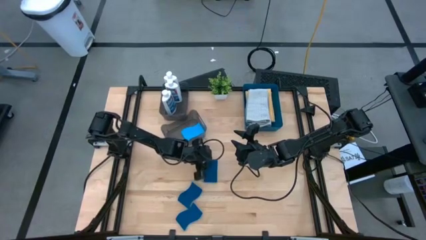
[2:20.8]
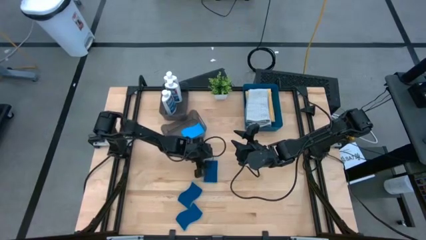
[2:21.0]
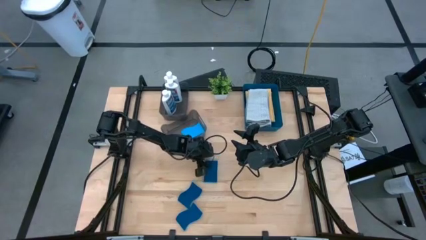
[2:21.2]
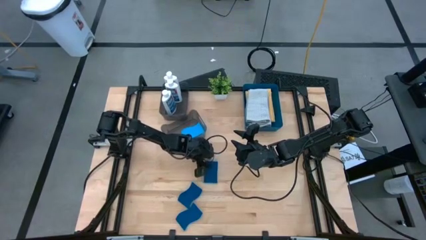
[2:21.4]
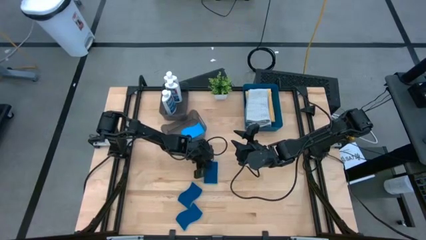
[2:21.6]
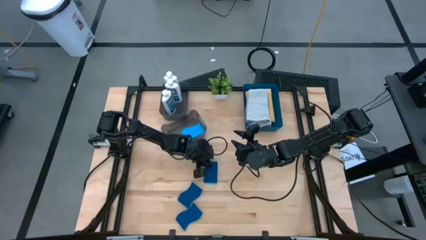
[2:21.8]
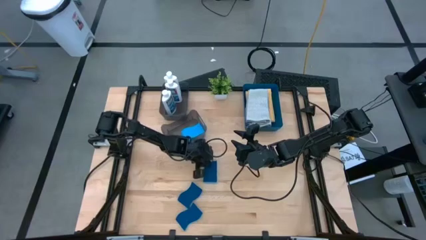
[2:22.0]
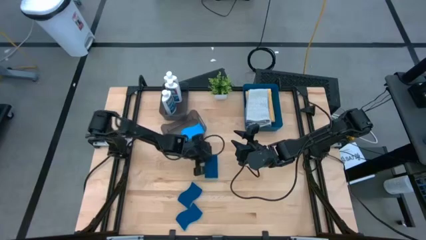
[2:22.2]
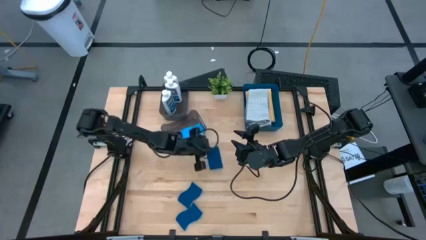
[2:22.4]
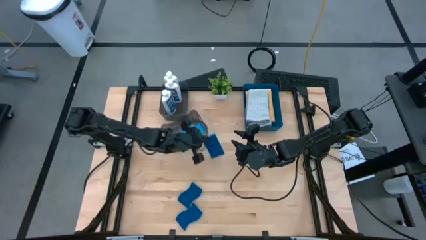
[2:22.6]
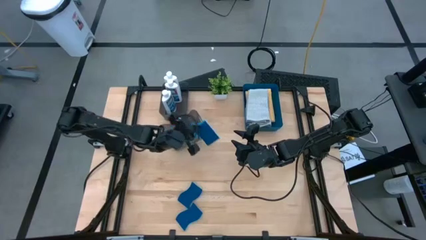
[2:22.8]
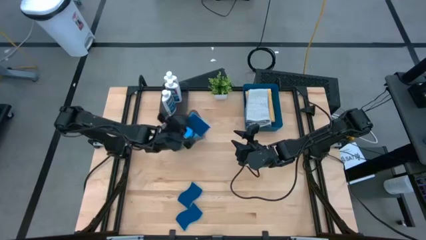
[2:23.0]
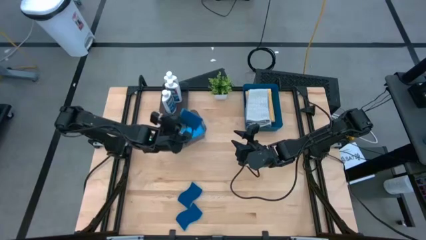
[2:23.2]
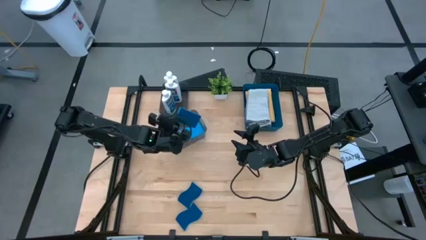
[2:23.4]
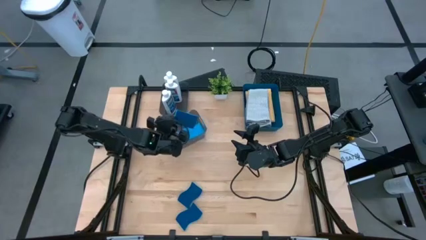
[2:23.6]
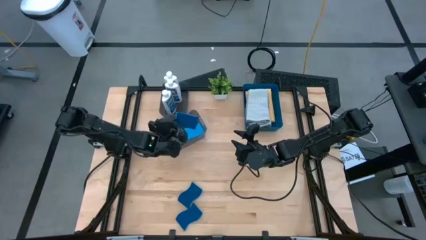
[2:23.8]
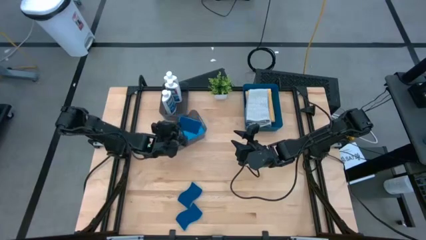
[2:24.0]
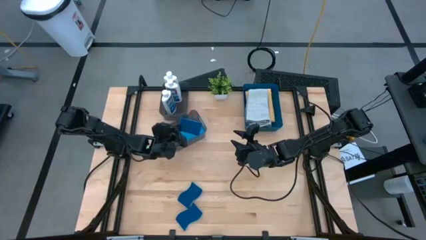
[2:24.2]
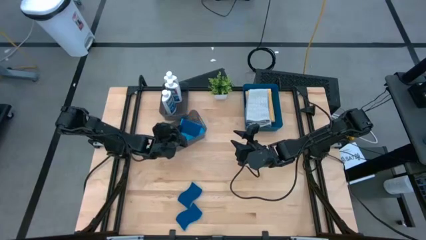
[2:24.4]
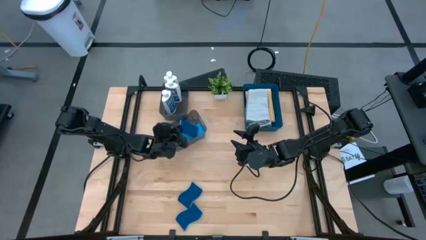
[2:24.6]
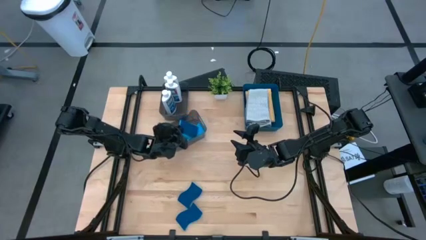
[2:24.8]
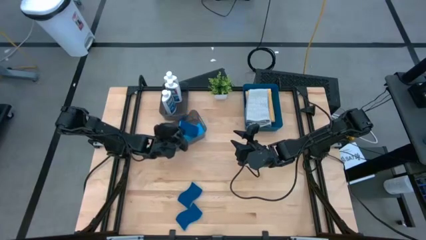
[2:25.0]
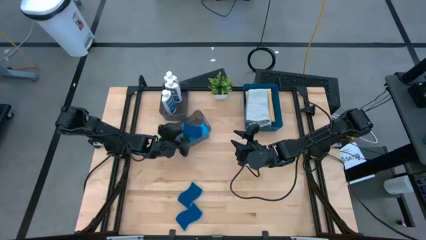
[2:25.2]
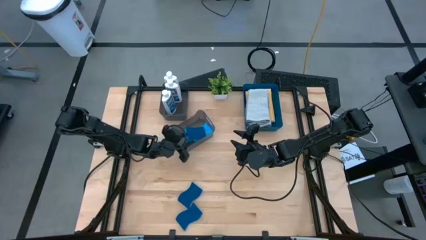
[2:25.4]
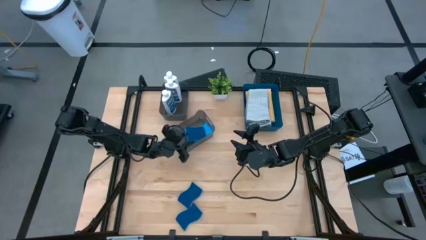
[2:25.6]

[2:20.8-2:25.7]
Task: Pick & Place Kitchen Items
Put the blue sponge into the bottom black bin

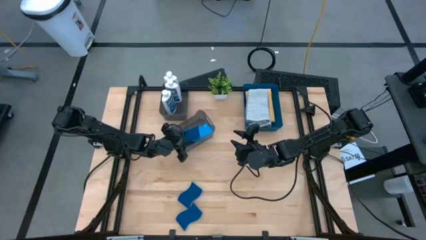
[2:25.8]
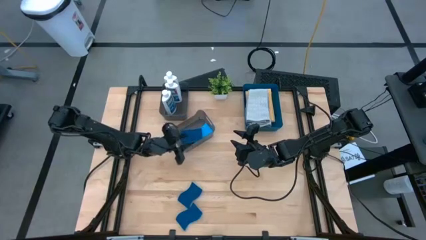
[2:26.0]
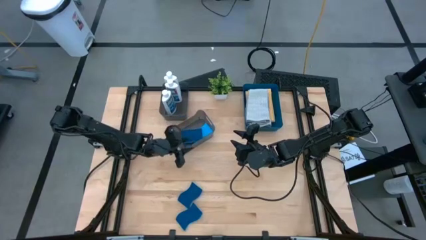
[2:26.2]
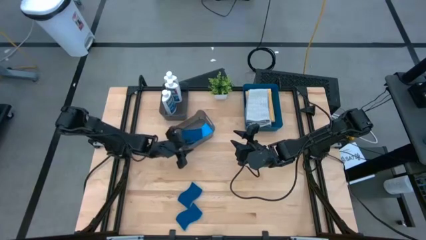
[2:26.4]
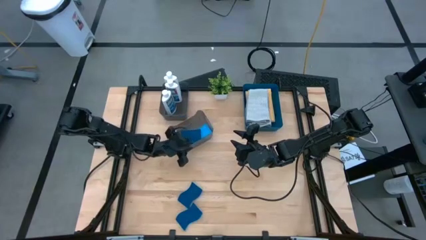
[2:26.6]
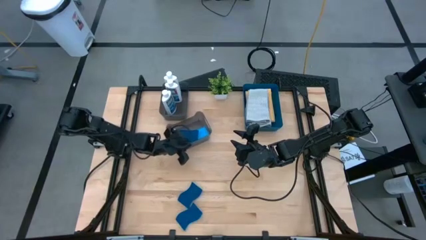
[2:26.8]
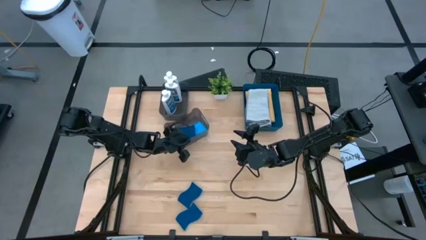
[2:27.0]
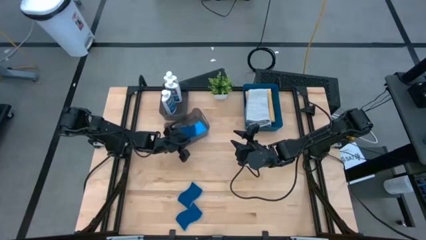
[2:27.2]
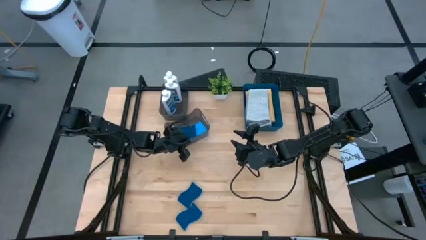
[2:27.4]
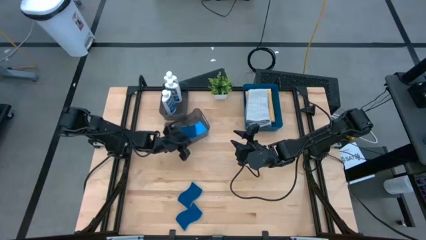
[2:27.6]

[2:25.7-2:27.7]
Adjust the bottom black bin

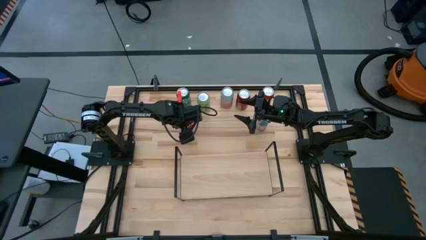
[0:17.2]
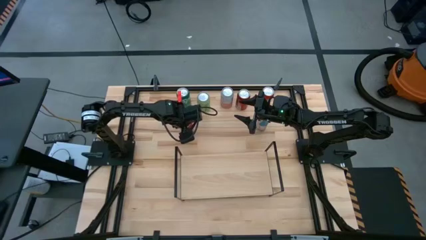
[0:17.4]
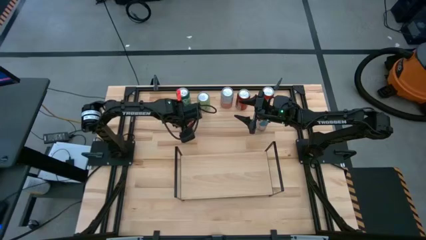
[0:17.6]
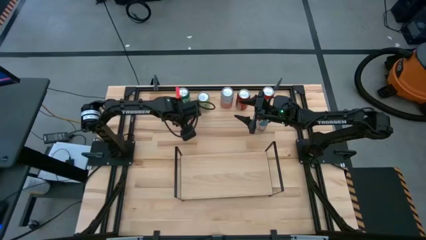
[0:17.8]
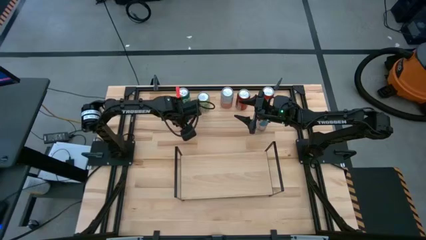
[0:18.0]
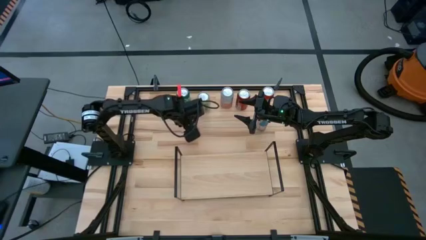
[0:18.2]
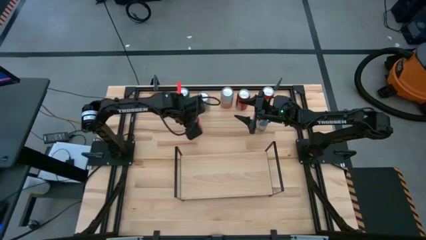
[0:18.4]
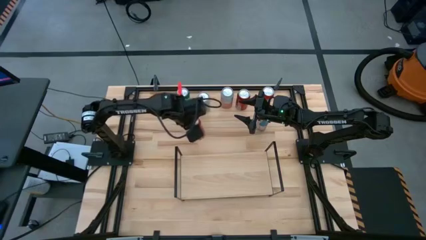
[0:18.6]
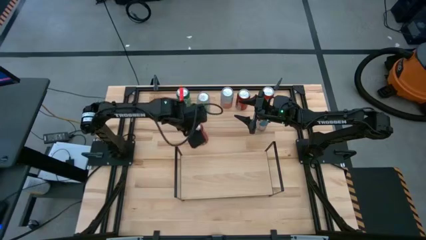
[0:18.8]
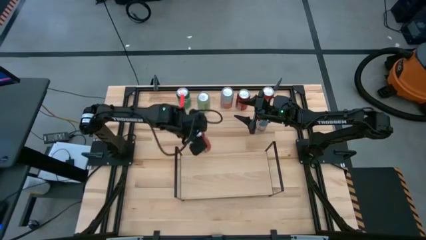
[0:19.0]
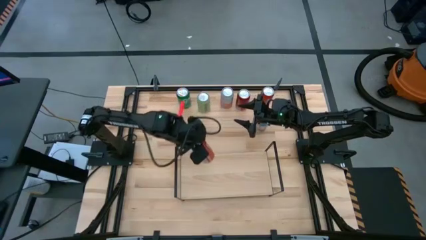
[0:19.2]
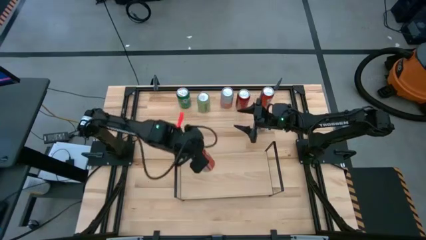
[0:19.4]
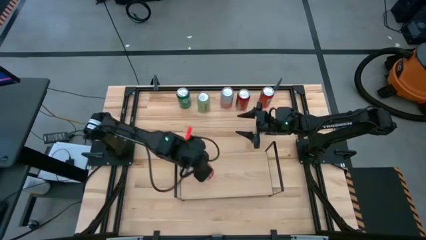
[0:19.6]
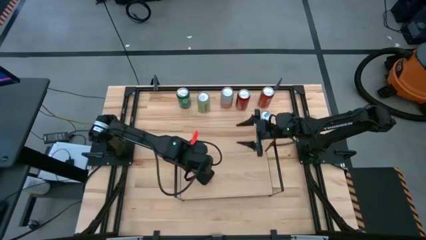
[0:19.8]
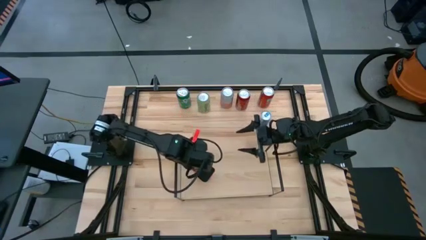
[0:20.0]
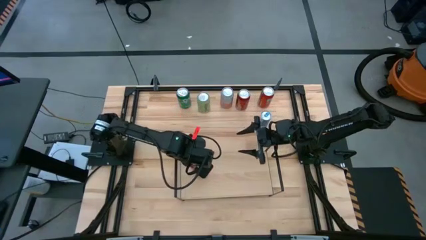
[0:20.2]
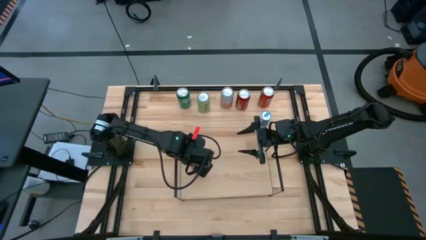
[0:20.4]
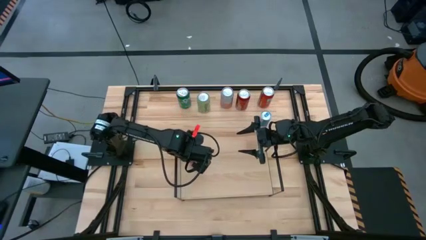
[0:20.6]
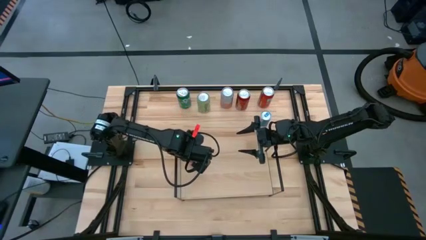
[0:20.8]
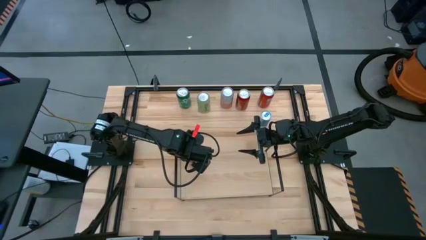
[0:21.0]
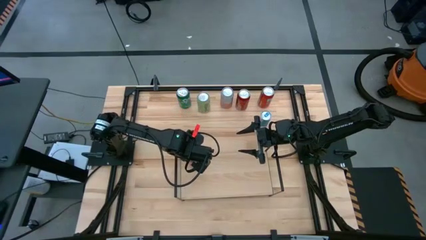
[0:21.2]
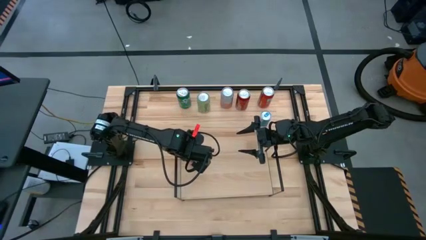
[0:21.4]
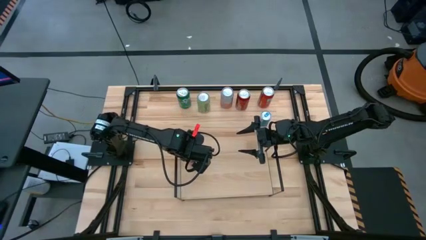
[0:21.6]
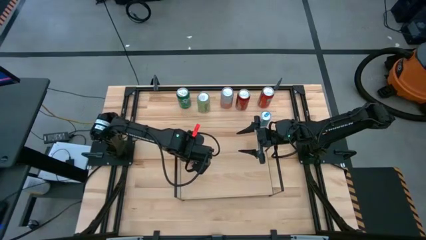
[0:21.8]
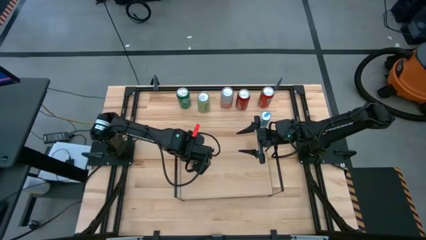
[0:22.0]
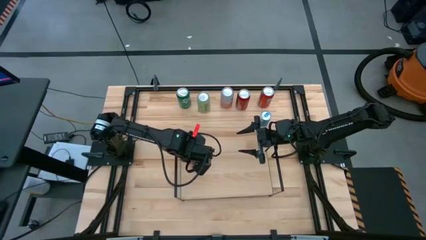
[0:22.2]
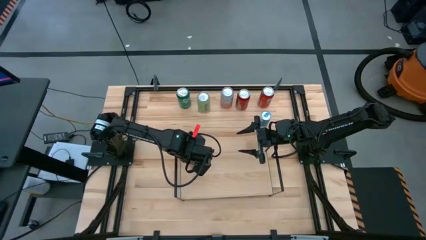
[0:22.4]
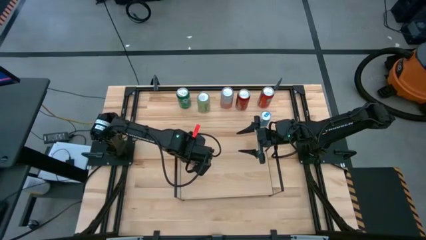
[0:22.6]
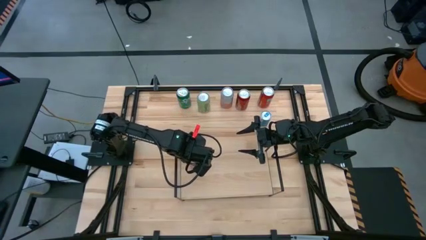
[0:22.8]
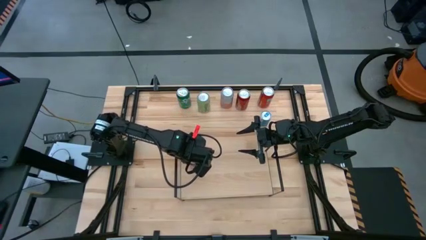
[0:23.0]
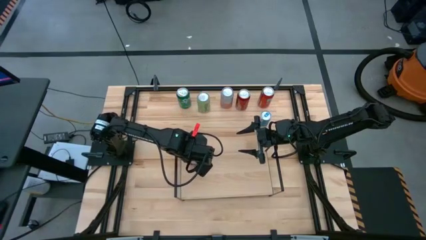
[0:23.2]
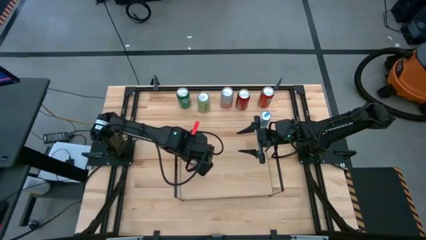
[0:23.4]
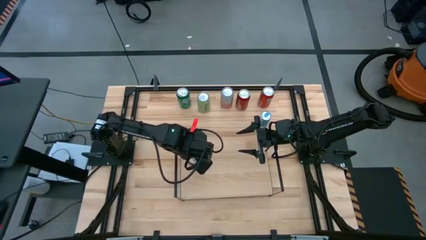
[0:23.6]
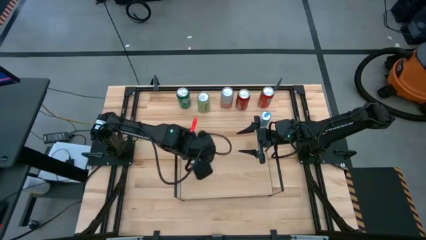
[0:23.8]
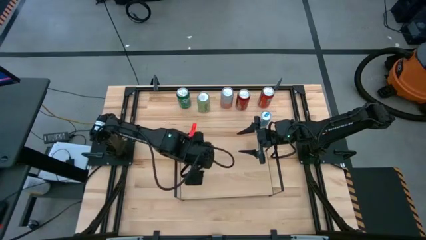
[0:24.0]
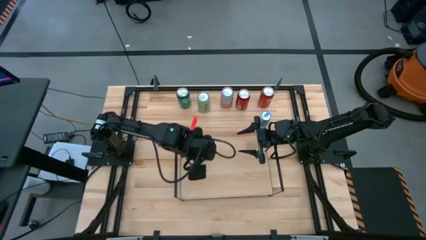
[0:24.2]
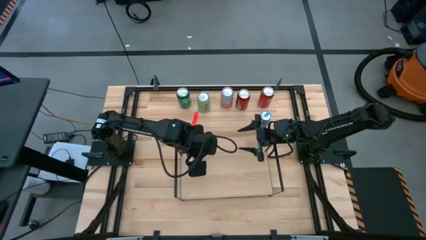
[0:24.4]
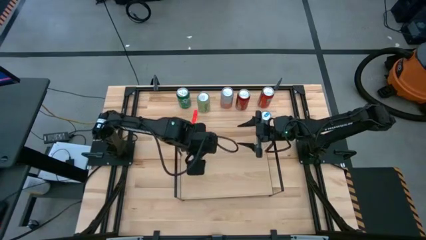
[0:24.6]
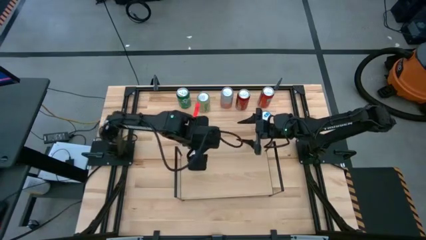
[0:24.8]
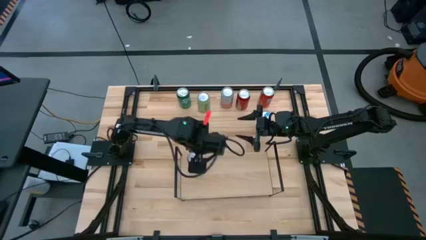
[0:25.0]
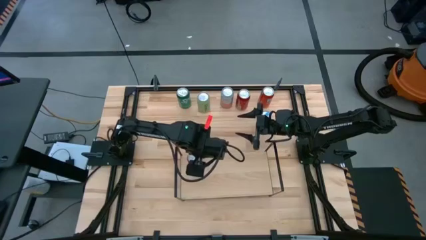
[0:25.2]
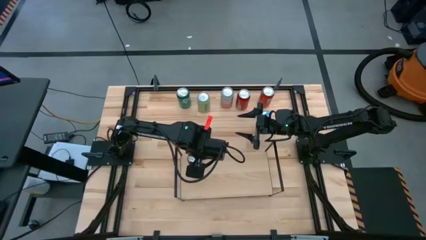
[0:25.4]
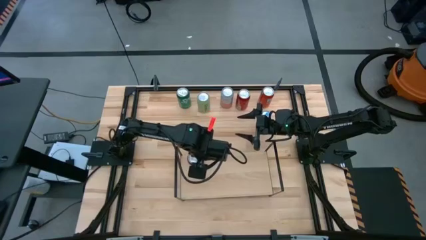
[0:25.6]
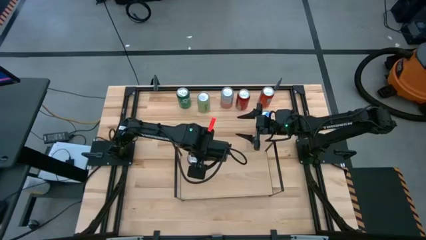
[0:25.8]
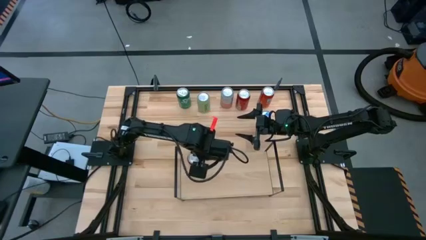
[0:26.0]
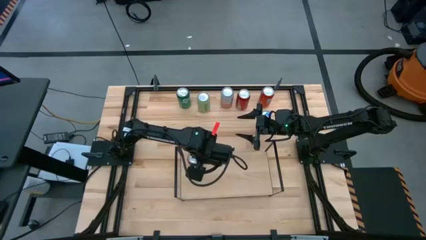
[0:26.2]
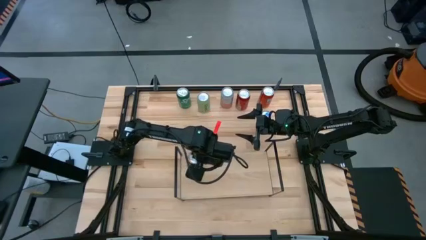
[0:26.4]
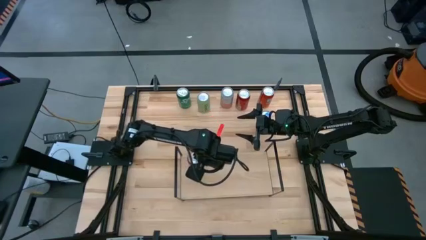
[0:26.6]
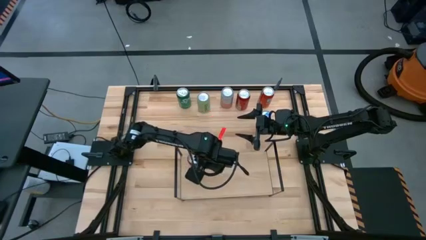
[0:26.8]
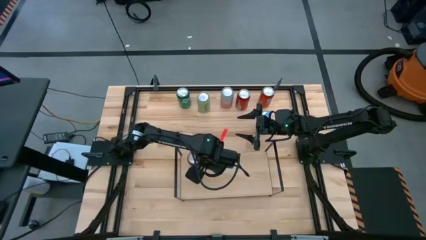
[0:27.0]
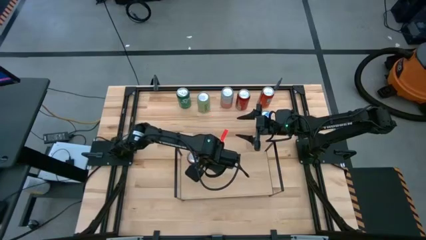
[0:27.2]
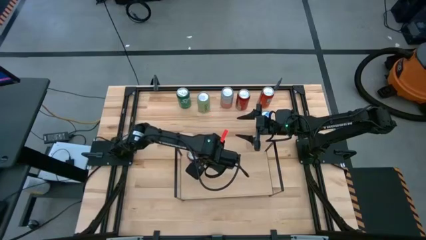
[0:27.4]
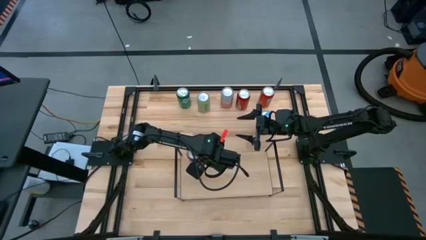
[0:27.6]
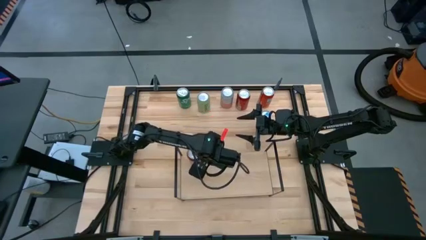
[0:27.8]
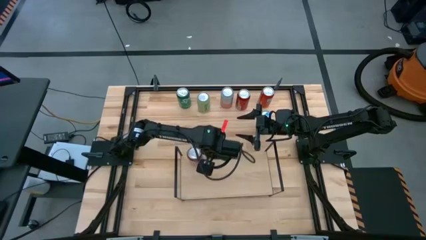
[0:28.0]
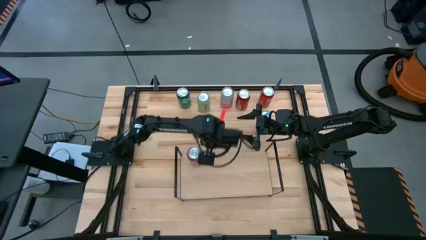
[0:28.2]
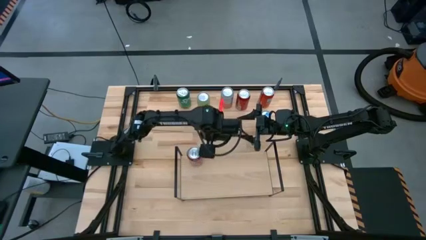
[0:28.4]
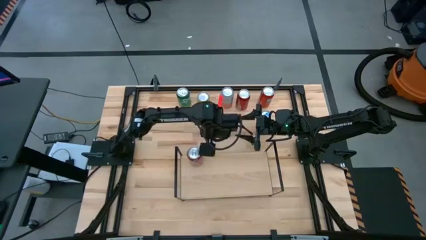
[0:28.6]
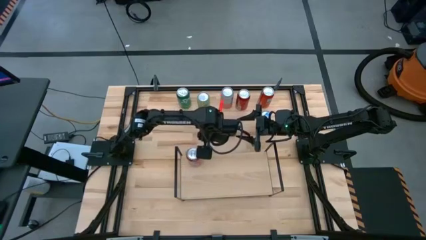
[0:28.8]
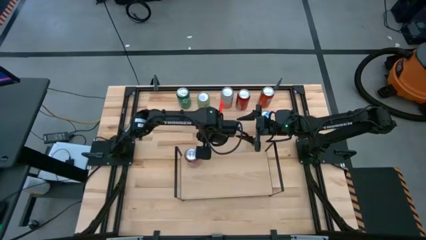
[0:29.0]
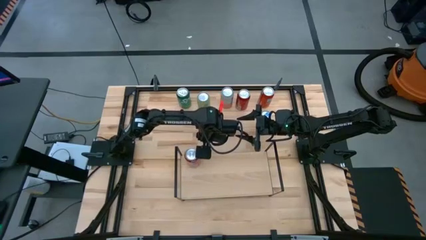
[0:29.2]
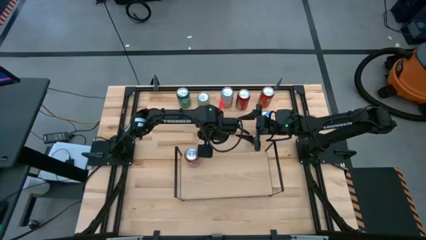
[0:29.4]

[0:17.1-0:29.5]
Task: Place canned beverage on shelf
Put the bottom orange soda can on the shelf
